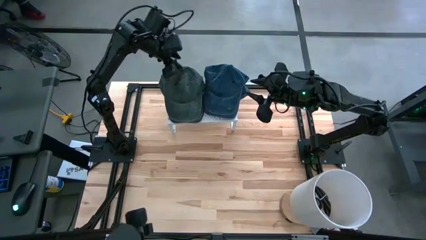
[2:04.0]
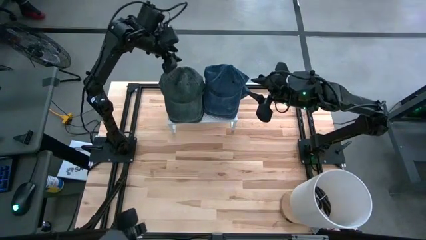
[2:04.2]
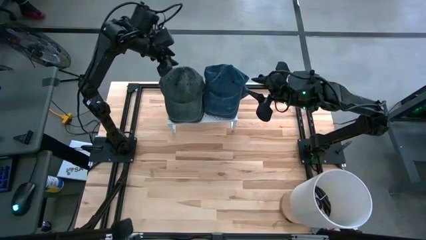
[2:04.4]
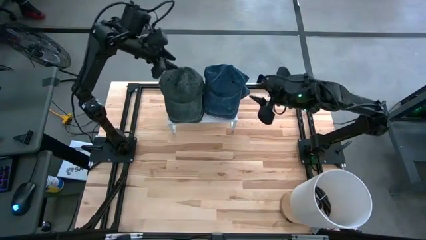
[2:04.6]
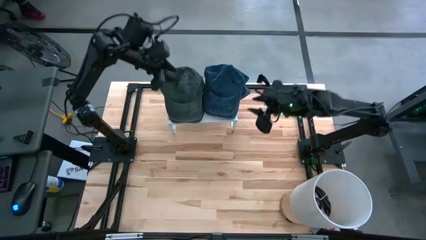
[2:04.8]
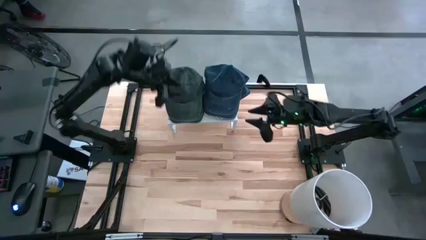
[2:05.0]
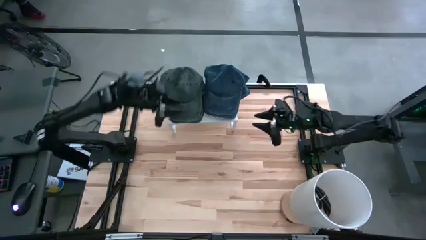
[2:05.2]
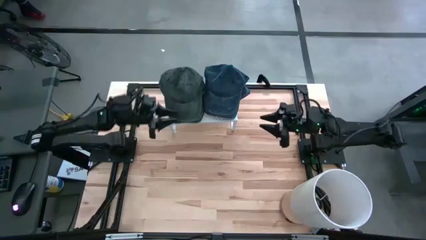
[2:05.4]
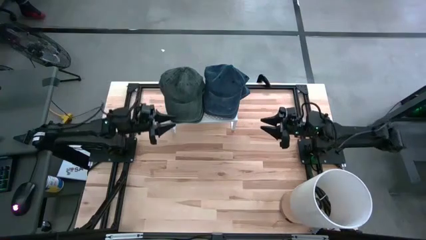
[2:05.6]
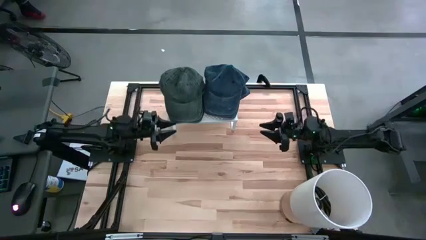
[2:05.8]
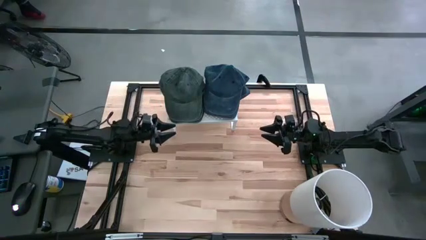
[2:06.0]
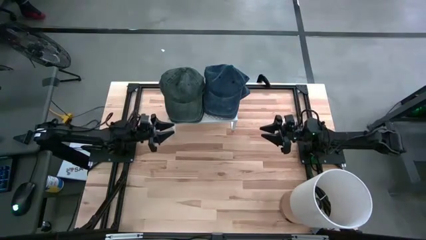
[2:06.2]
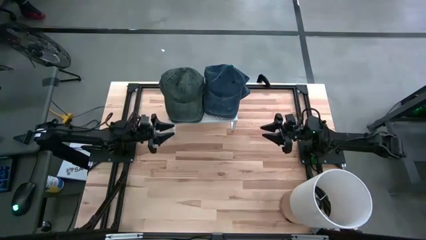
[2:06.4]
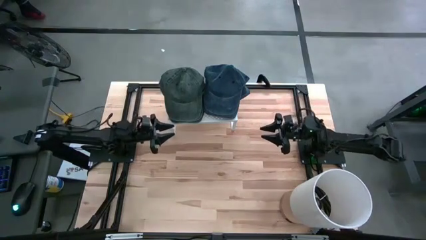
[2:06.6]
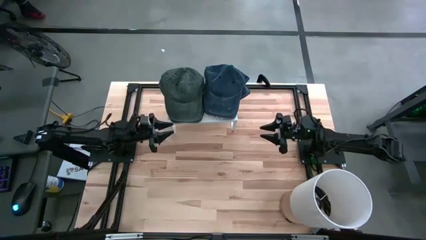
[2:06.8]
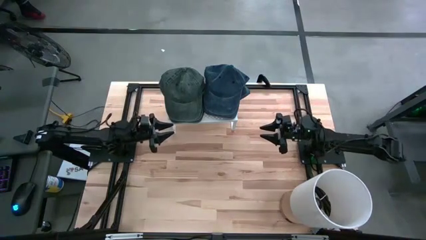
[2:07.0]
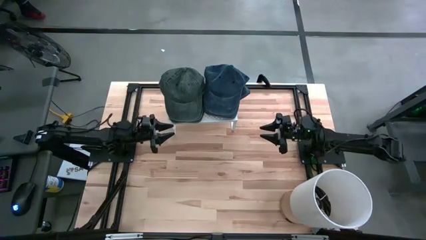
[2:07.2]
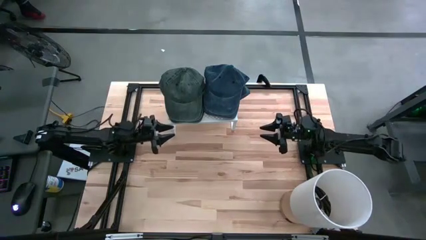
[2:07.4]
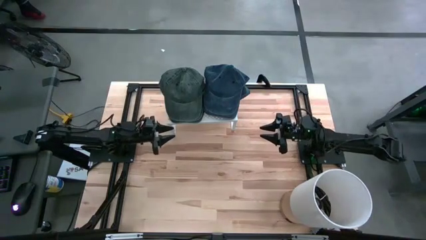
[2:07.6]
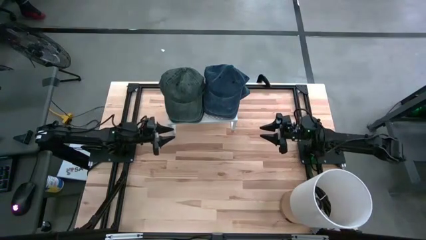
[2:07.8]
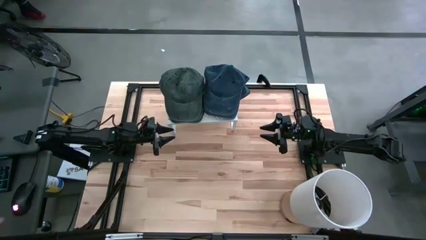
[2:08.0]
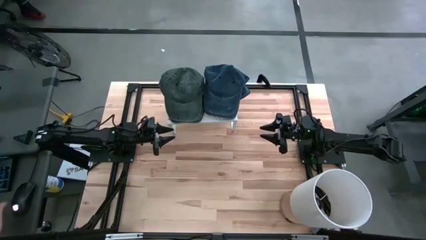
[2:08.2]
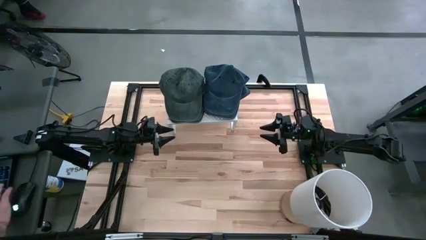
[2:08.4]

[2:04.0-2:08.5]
Task: Pick & Place hat
Return to Home Position

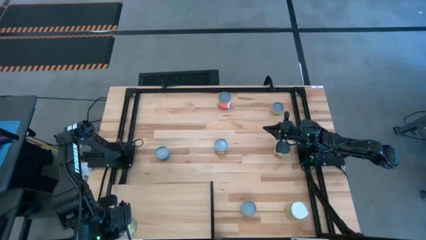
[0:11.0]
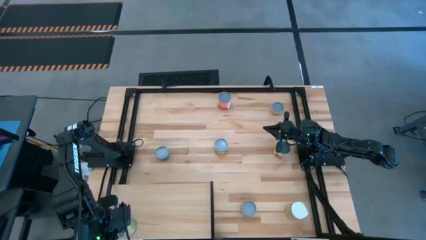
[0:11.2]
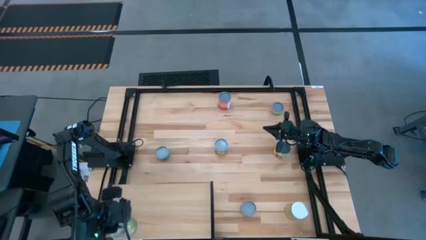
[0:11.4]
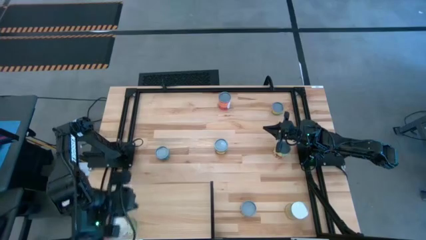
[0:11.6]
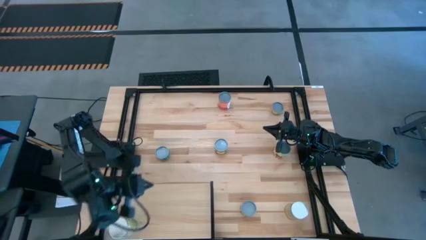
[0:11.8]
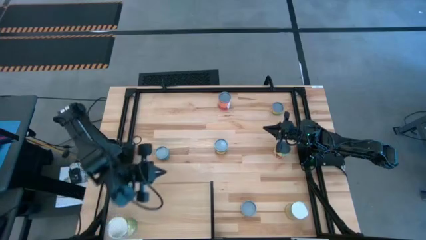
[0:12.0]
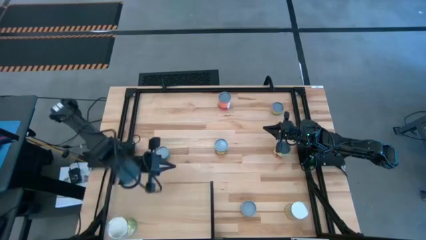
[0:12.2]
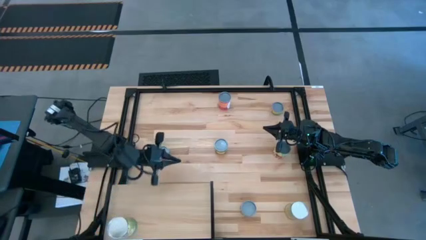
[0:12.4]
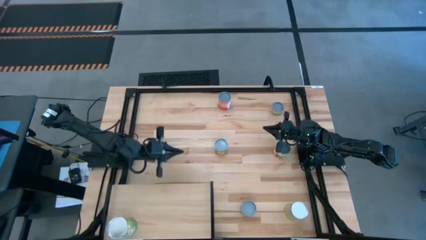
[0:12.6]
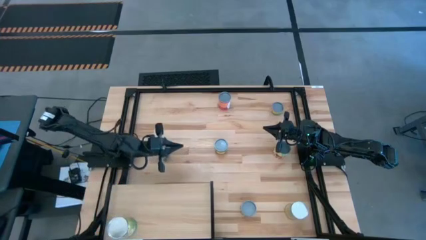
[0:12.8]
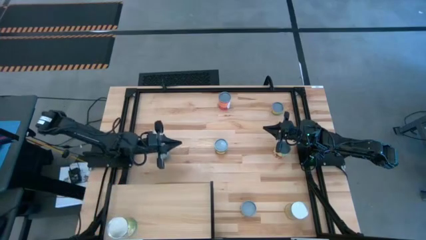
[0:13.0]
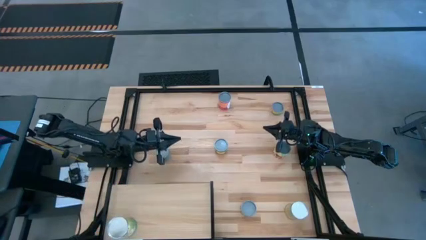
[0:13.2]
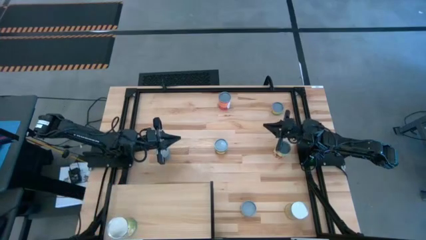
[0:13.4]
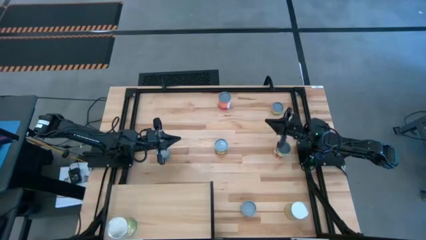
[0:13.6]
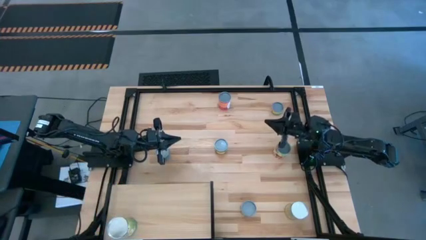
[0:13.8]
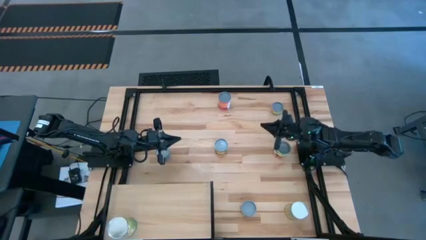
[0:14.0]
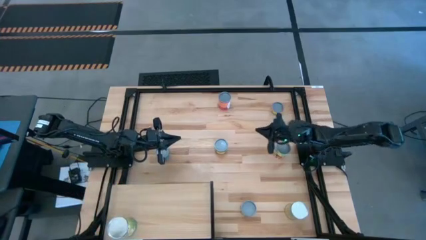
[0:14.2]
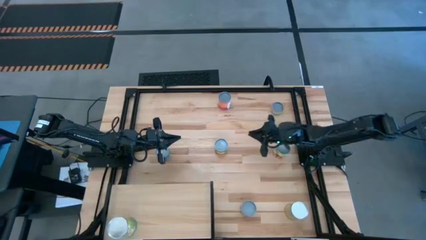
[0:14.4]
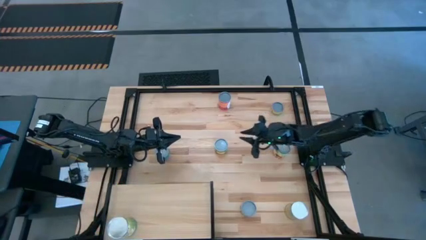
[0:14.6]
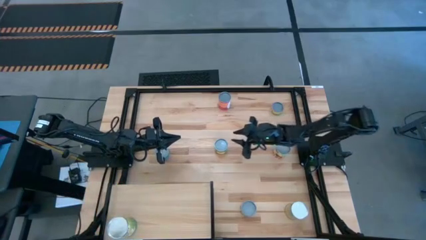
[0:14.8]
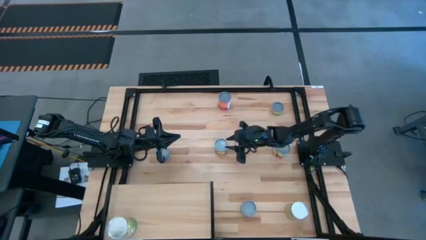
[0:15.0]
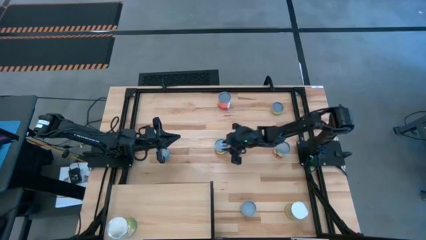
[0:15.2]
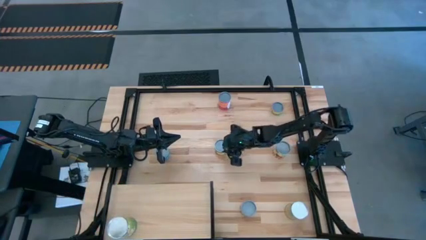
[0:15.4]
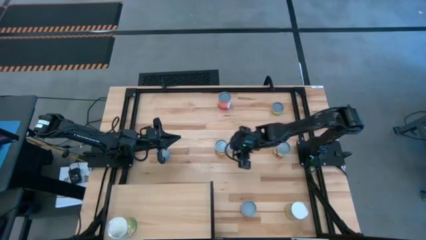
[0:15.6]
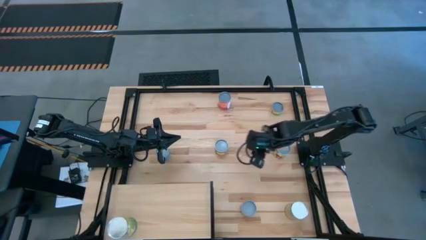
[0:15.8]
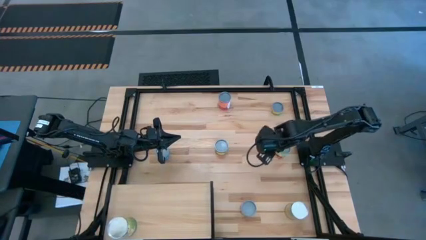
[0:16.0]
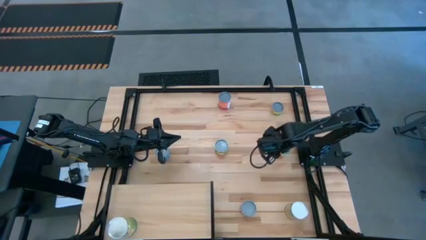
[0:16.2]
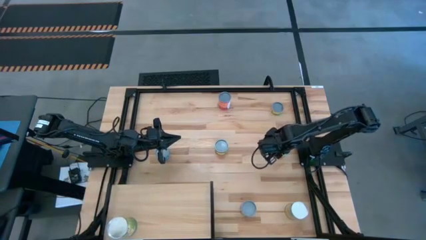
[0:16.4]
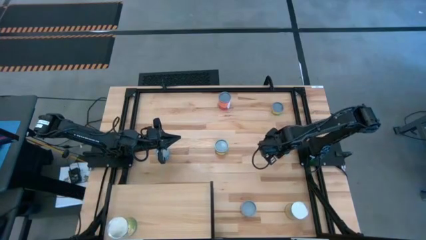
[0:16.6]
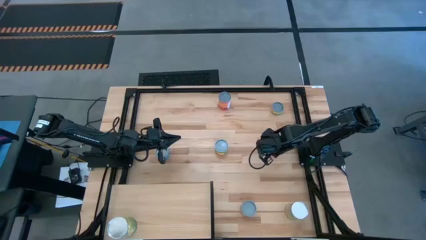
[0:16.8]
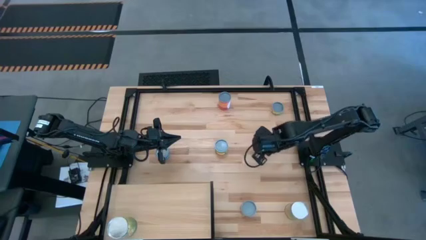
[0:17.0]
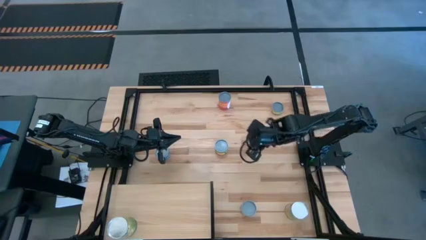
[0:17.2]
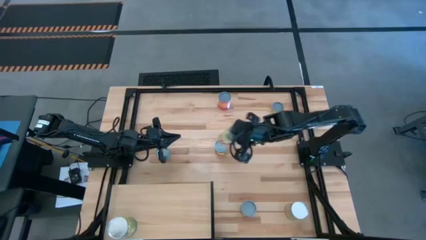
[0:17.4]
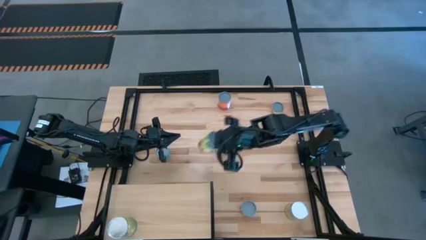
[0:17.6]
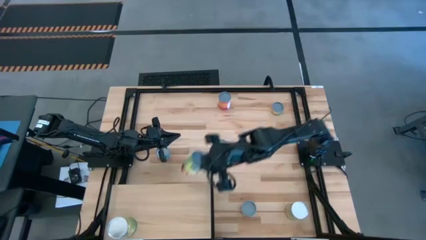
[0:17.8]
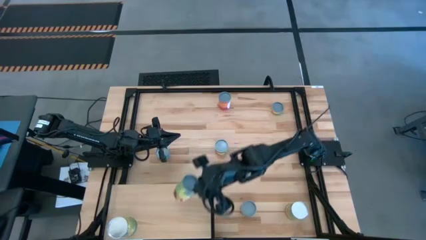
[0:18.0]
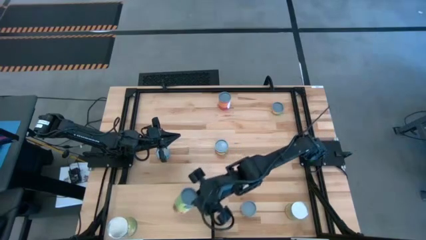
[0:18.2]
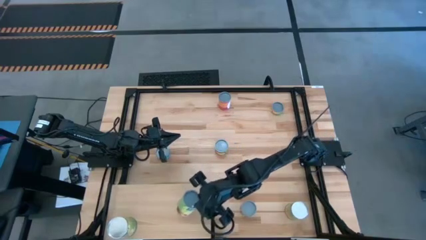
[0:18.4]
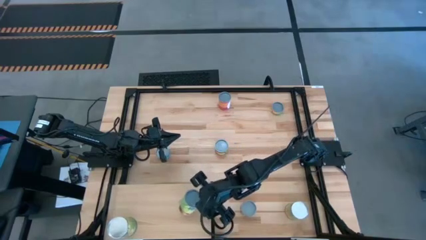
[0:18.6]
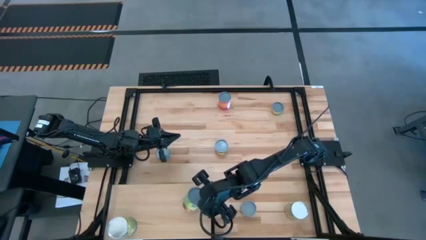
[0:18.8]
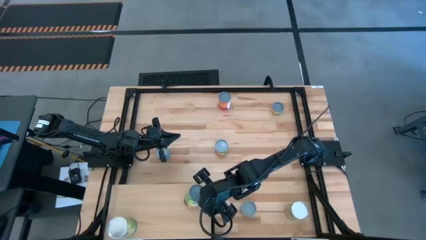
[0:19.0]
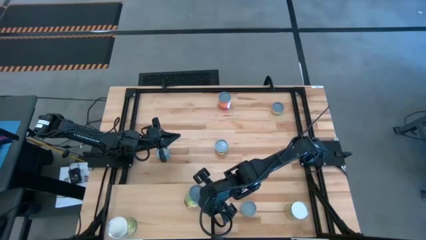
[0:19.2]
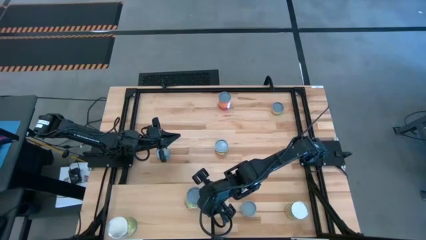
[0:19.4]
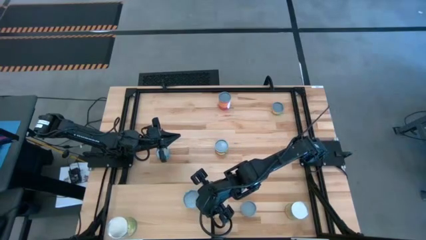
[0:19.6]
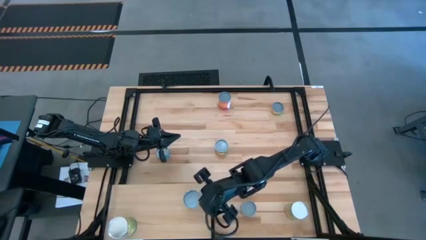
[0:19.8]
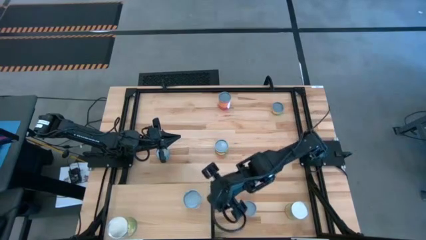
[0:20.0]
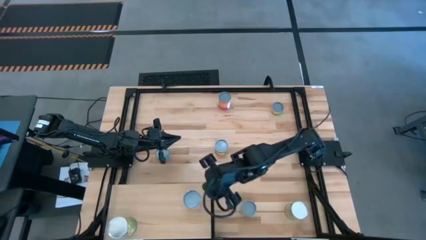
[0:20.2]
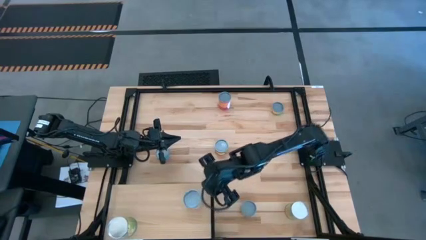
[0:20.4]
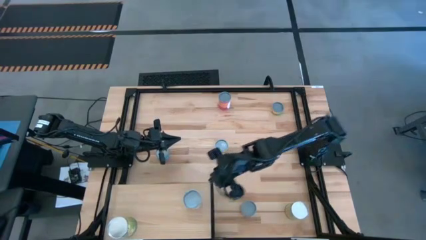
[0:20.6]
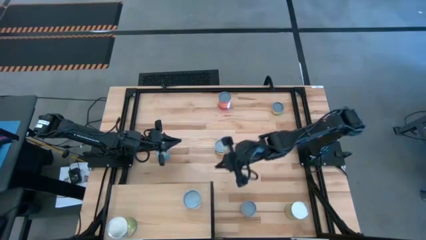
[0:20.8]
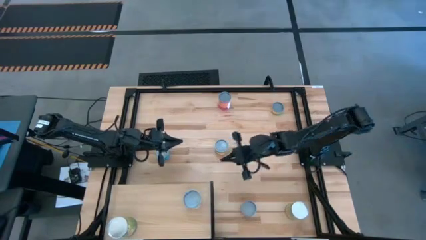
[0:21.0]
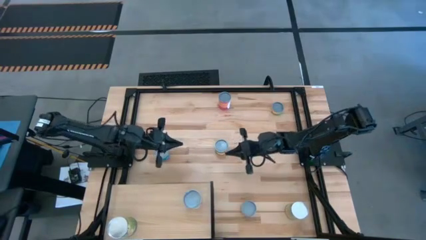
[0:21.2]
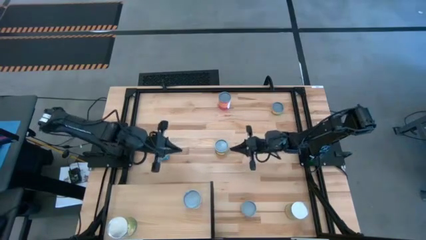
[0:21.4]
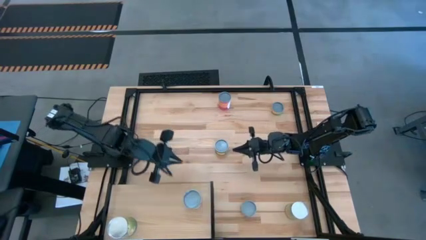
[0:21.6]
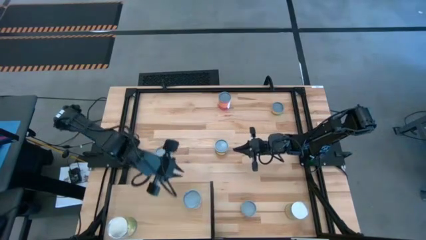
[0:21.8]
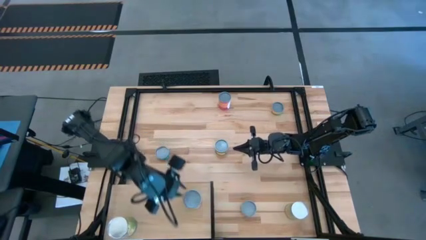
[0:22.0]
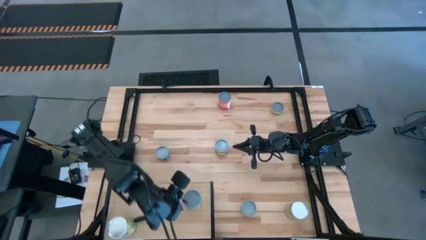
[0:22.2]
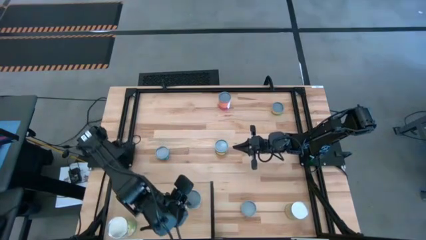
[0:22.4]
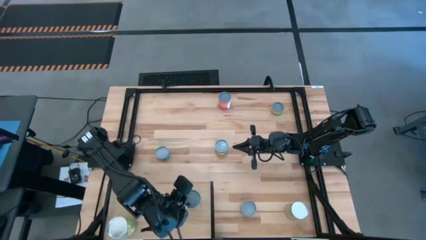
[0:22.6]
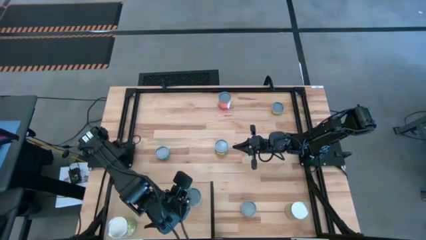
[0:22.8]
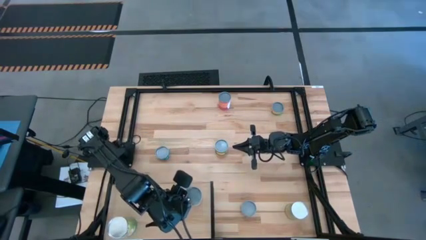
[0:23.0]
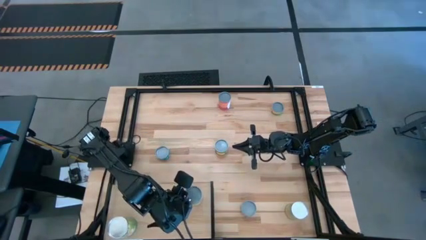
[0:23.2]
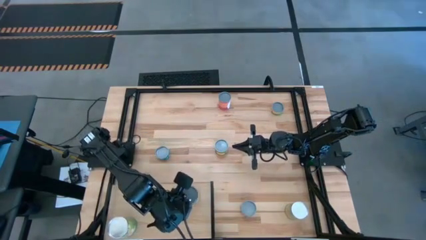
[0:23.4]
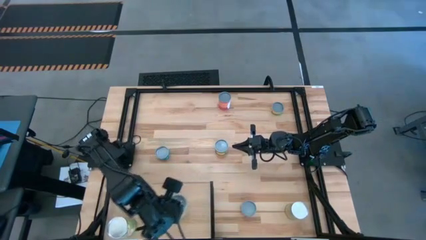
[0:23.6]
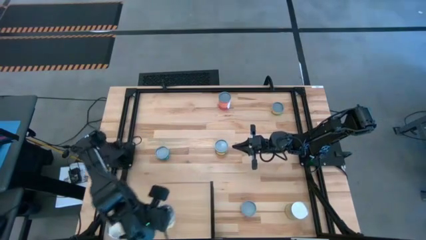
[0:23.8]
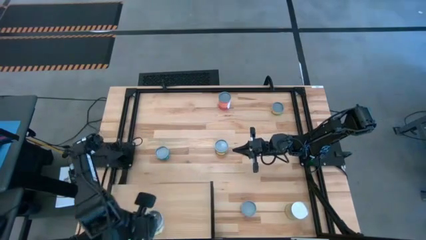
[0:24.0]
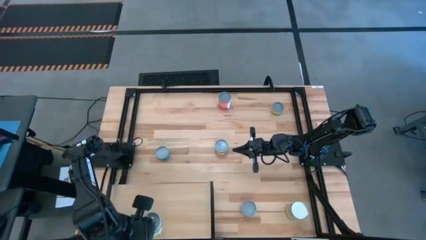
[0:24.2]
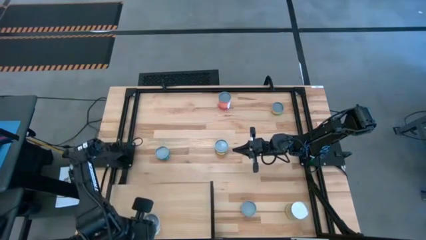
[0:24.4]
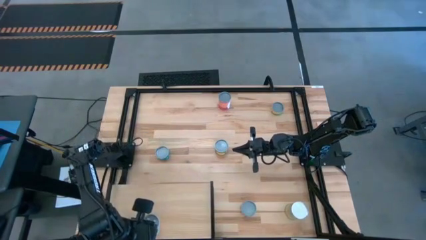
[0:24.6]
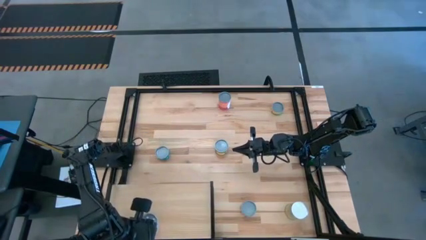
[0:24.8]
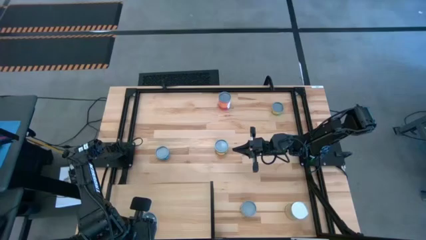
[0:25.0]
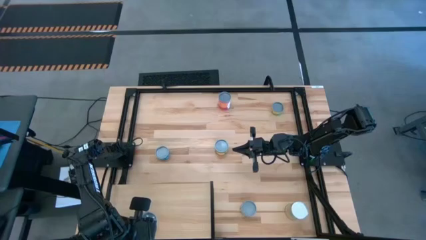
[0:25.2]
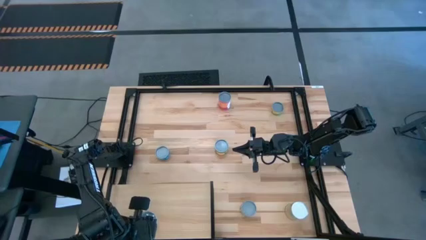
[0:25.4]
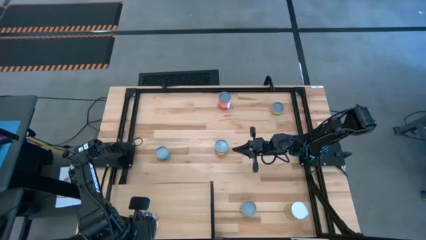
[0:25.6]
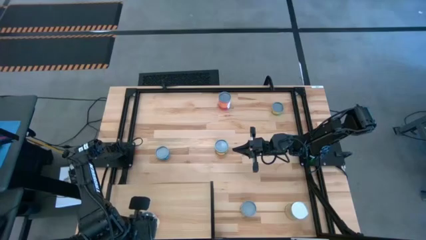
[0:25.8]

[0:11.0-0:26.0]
Task: Pick and place cans onto a shelf
Put the canned spaghetti sauce on the shelf
